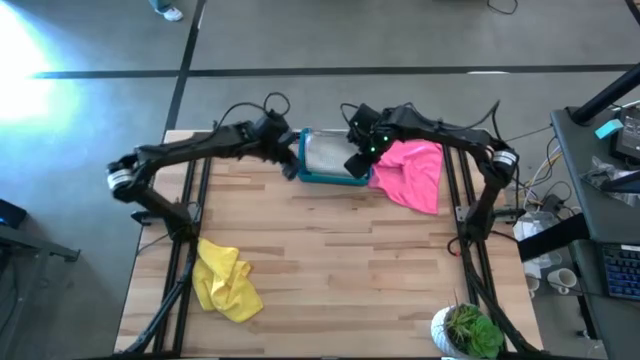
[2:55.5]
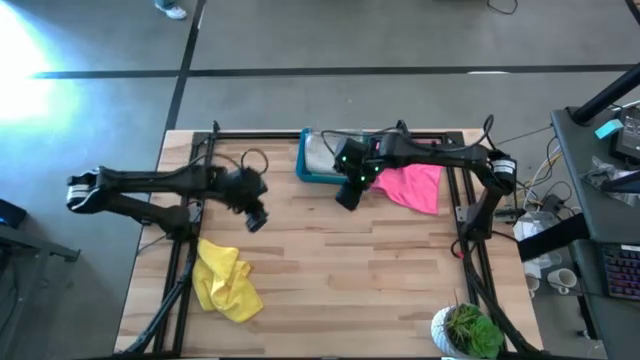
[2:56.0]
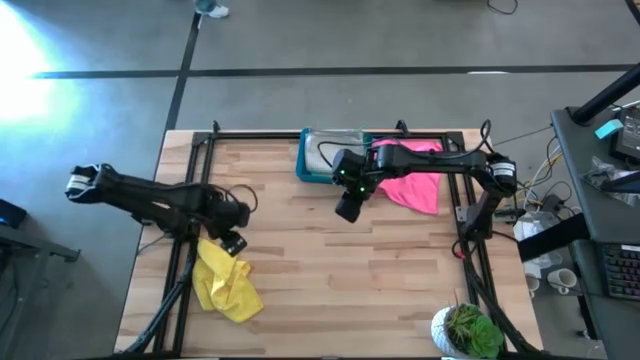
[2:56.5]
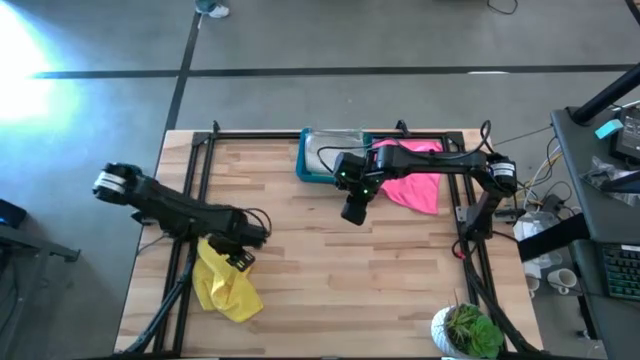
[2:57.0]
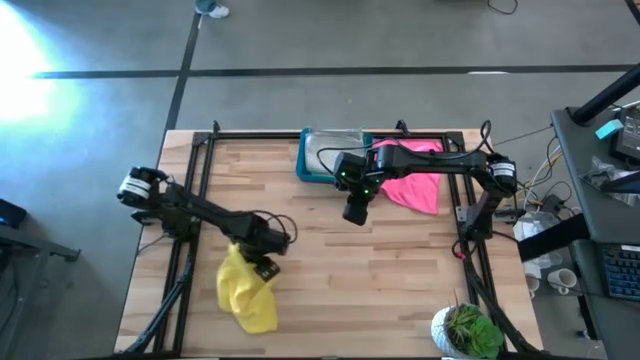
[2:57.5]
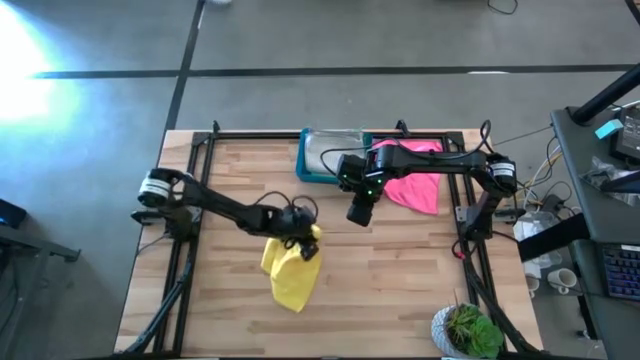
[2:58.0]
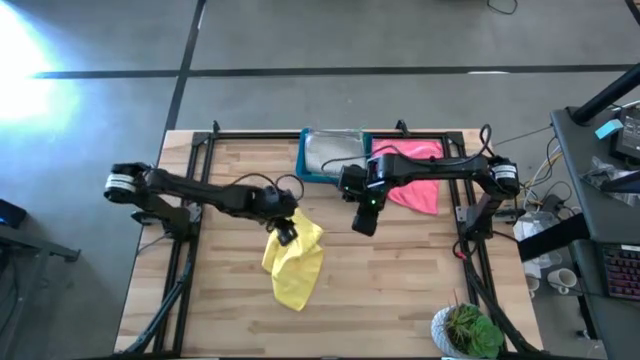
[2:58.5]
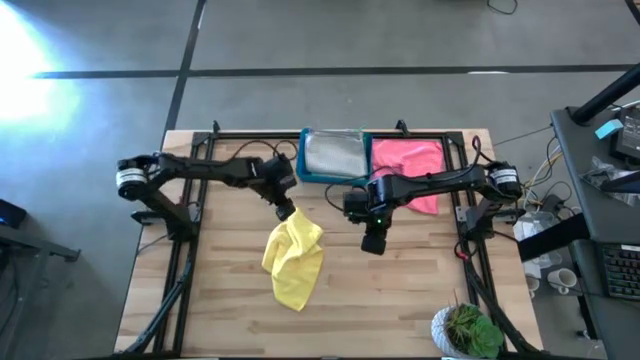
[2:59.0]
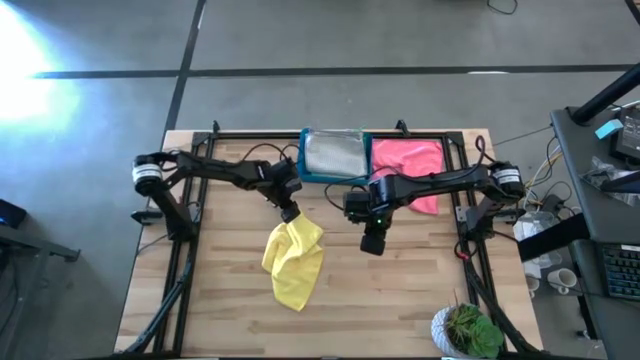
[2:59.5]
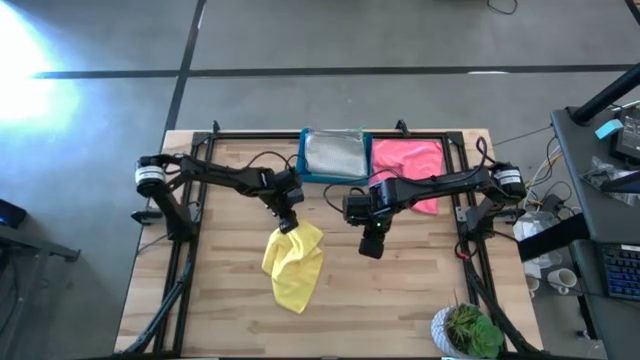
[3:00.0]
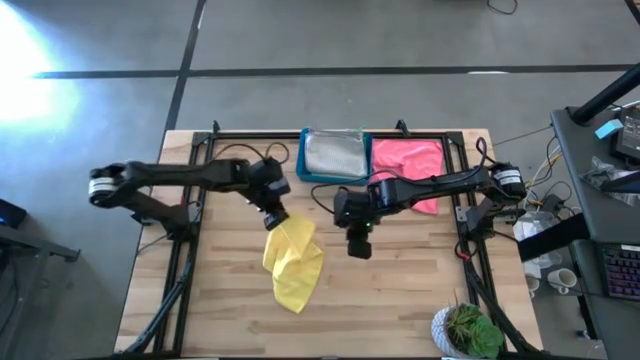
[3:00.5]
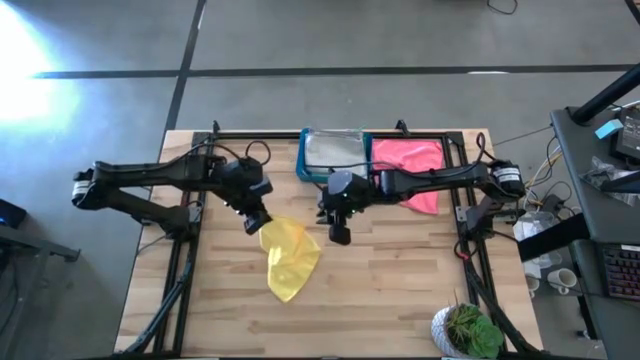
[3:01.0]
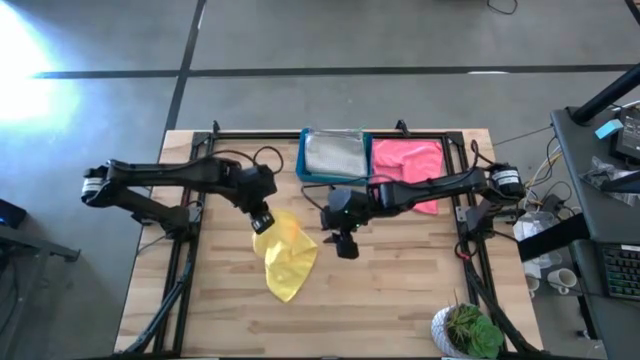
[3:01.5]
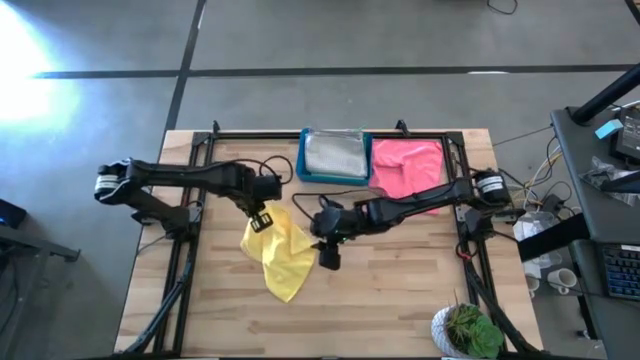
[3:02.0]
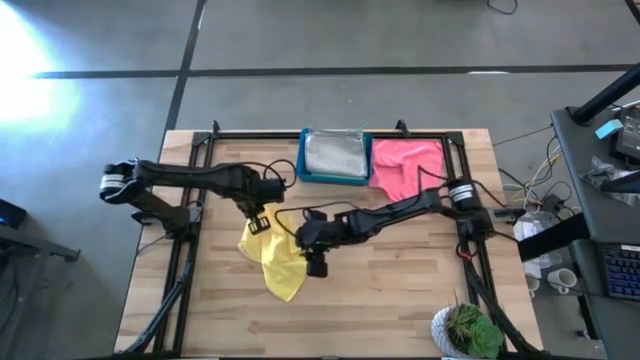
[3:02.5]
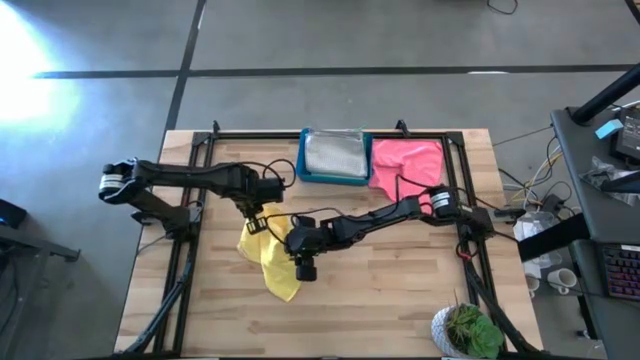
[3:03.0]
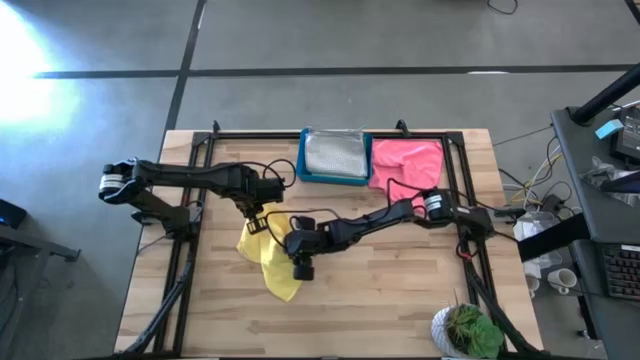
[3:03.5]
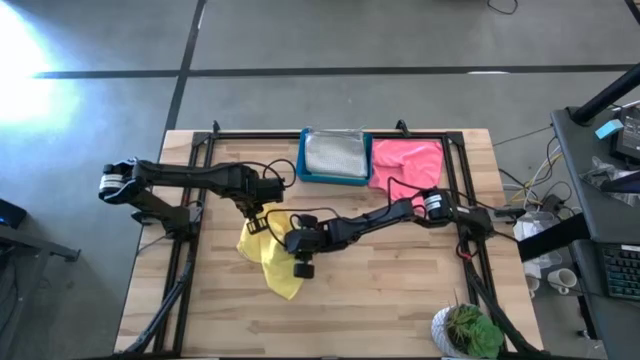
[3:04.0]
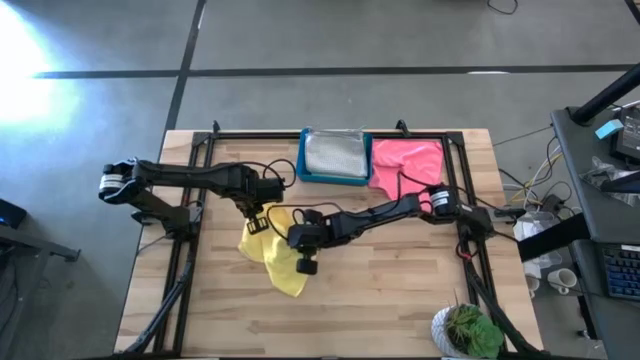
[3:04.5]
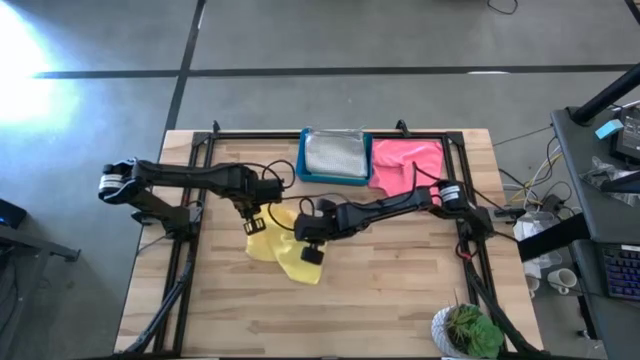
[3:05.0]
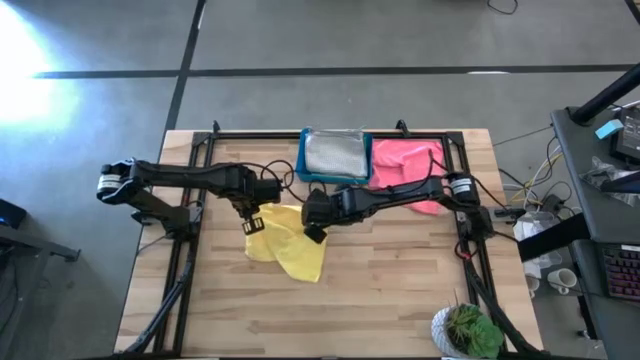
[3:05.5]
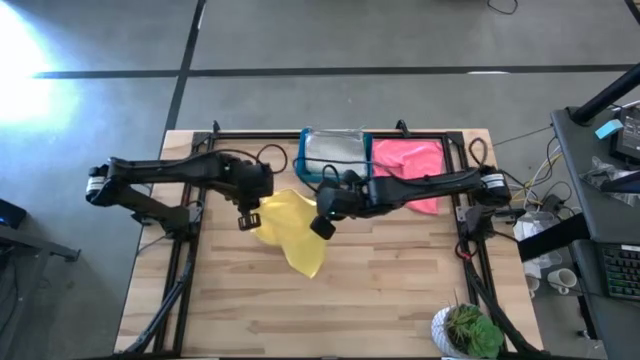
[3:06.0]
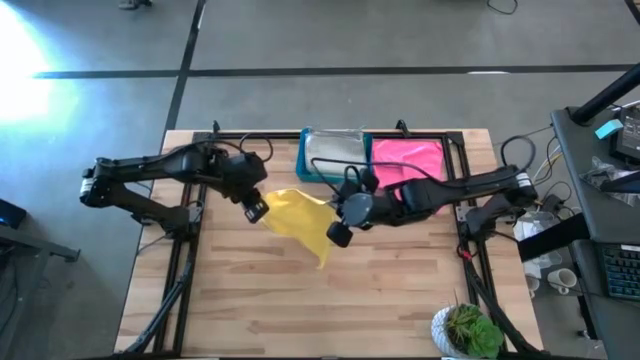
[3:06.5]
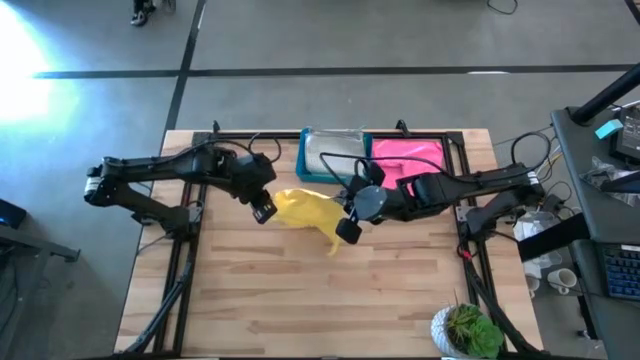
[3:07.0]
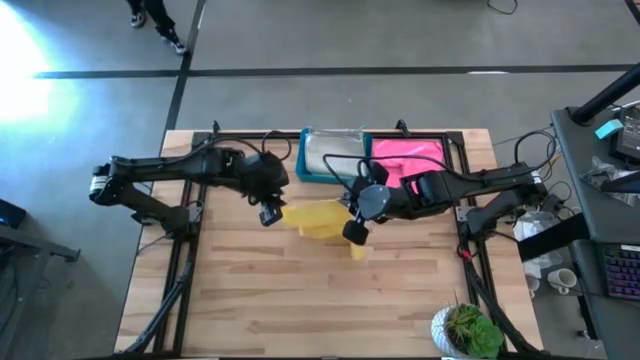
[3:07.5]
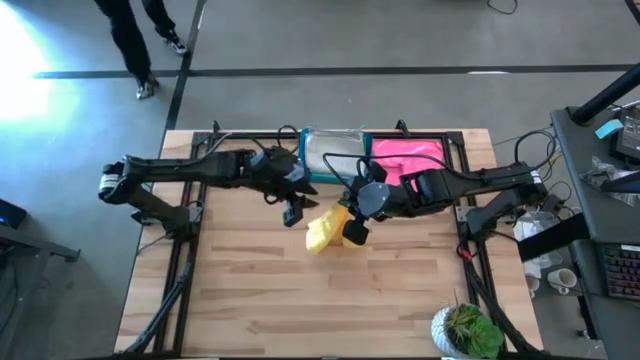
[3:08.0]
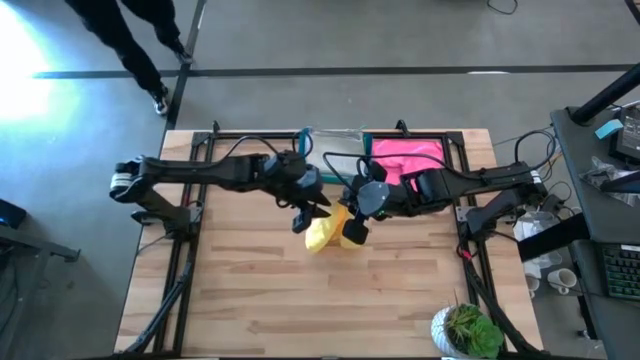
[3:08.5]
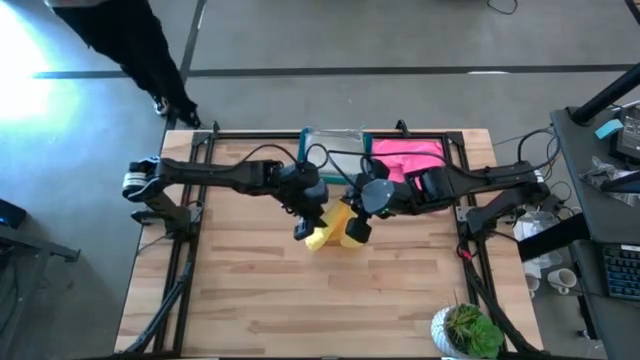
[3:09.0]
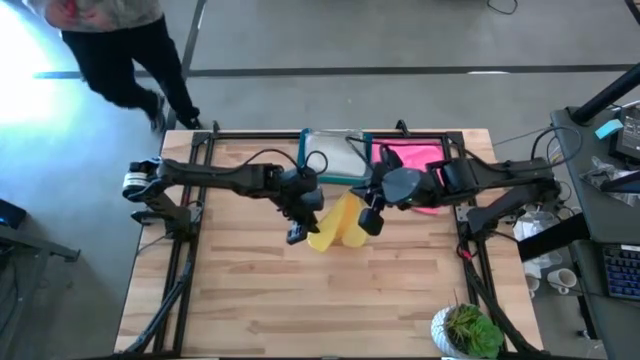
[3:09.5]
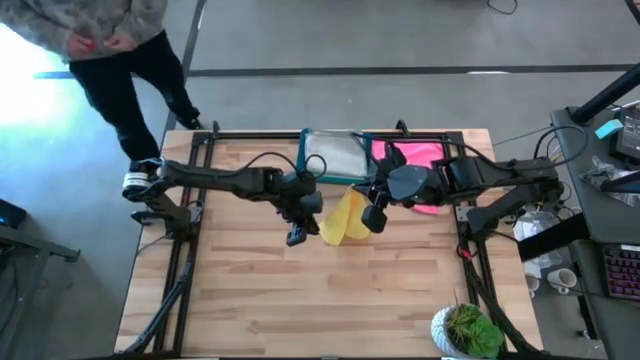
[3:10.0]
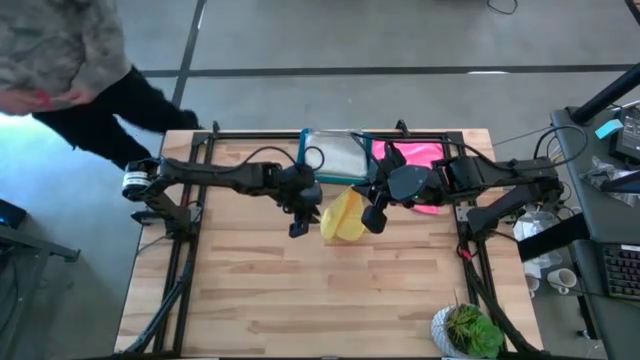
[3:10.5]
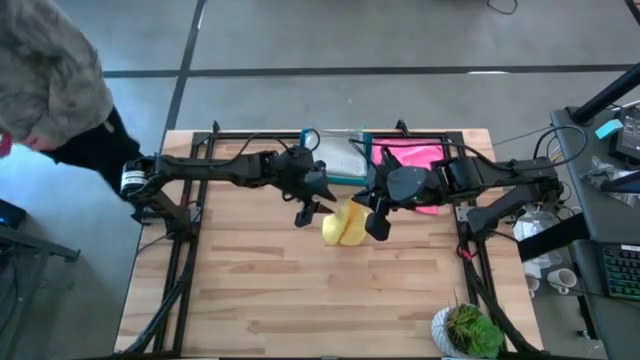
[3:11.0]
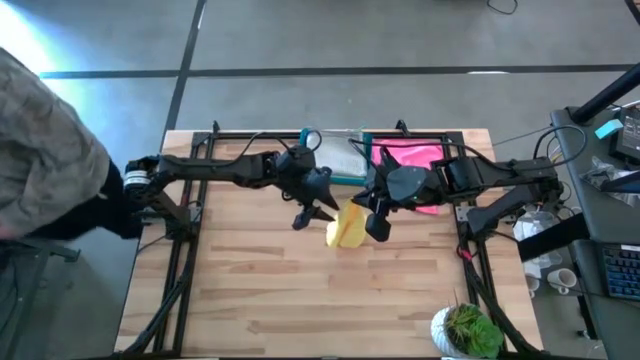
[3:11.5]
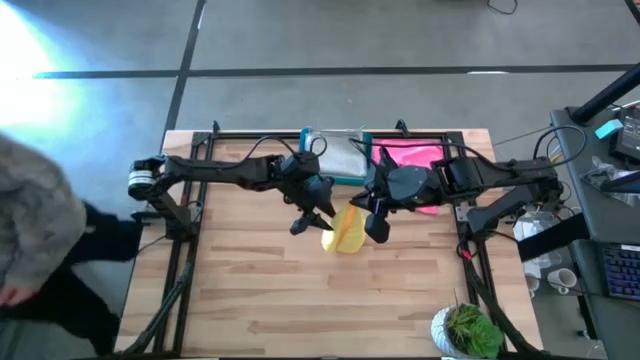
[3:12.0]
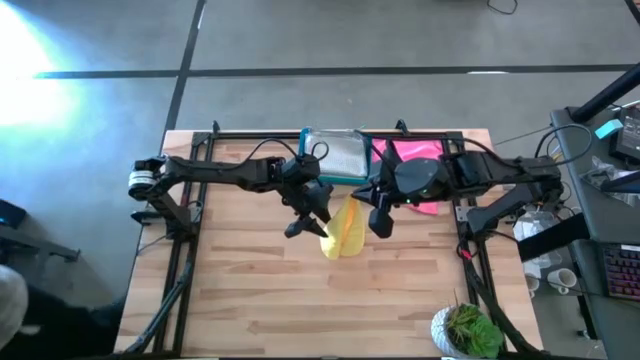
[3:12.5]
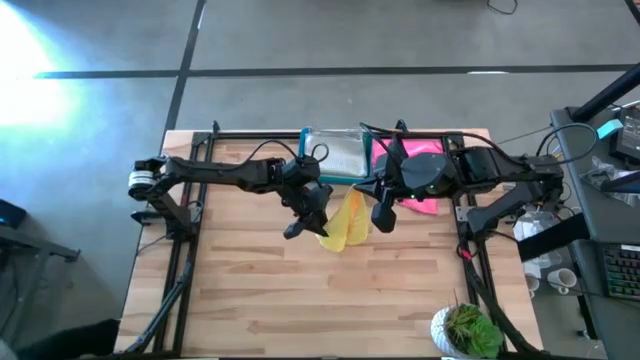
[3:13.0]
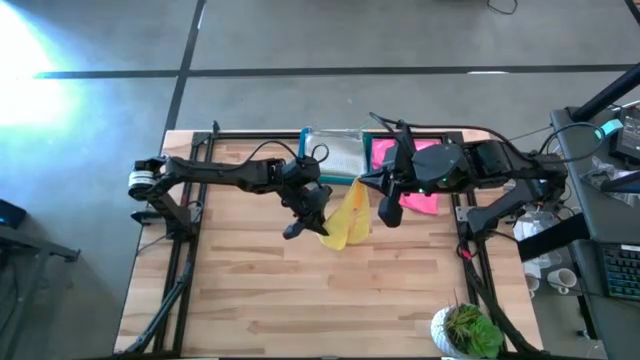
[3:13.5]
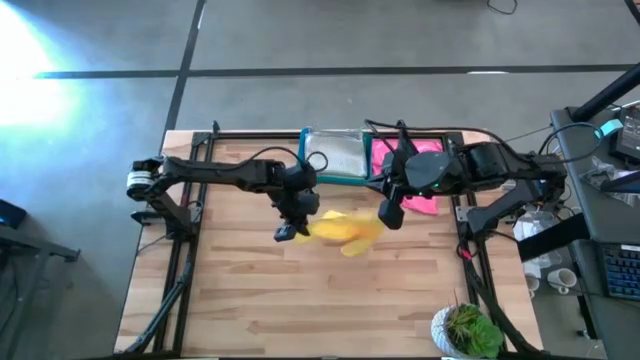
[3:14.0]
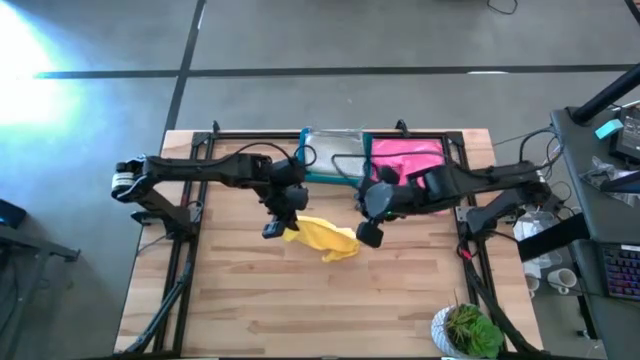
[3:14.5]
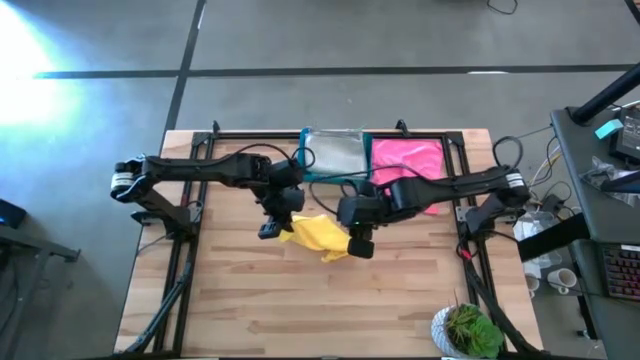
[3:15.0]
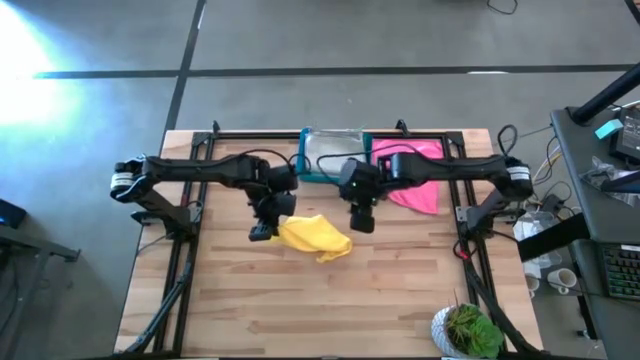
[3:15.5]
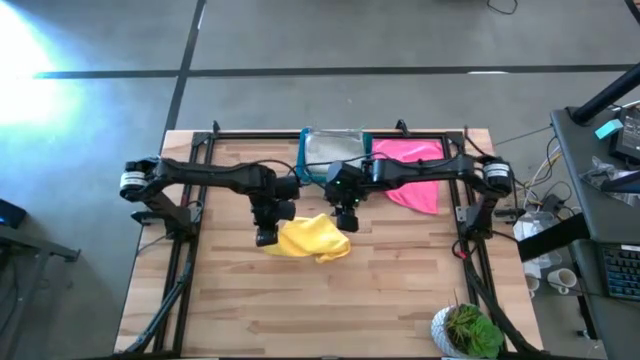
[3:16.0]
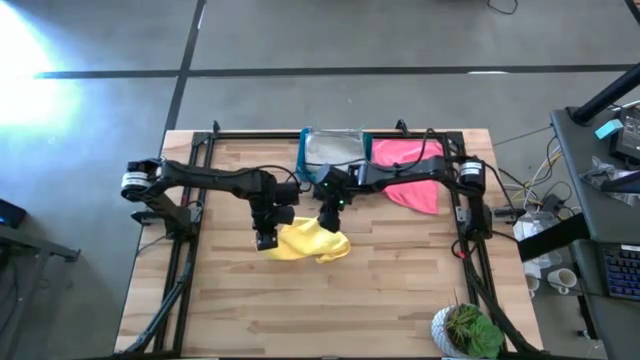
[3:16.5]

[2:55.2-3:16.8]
Task: Fold microfiber towels
Fold the yellow microfiber cloth

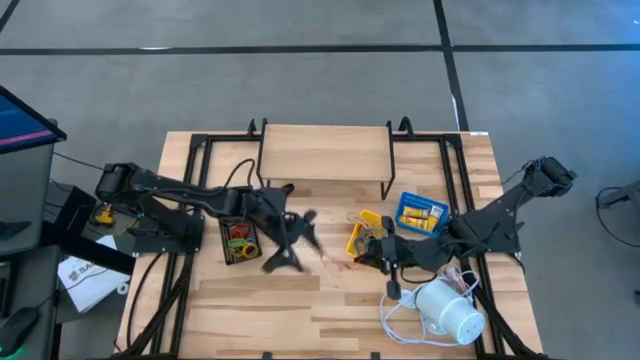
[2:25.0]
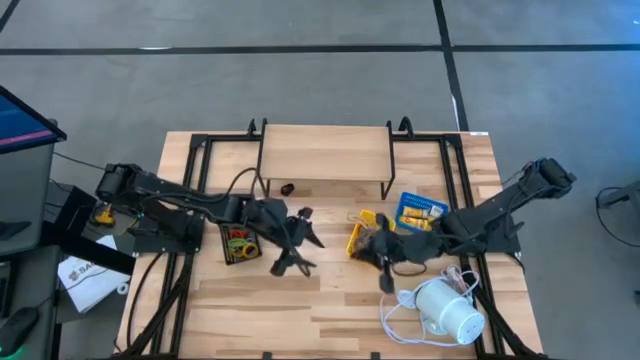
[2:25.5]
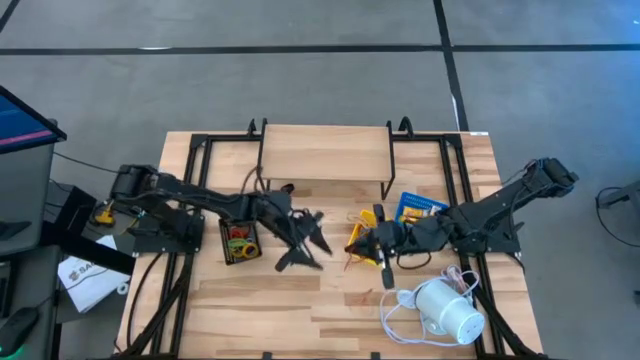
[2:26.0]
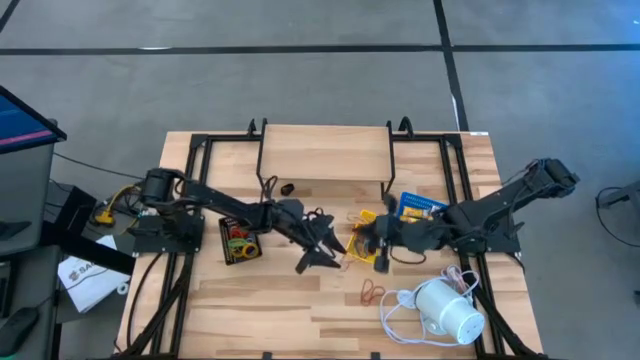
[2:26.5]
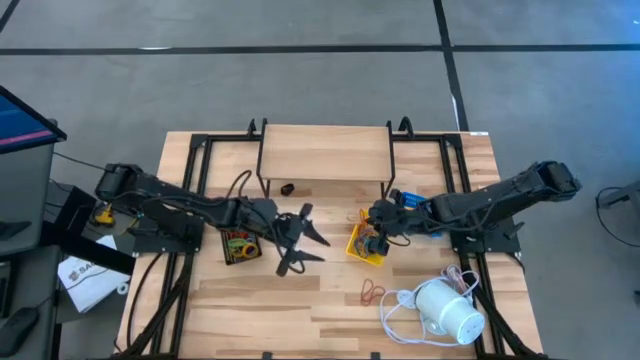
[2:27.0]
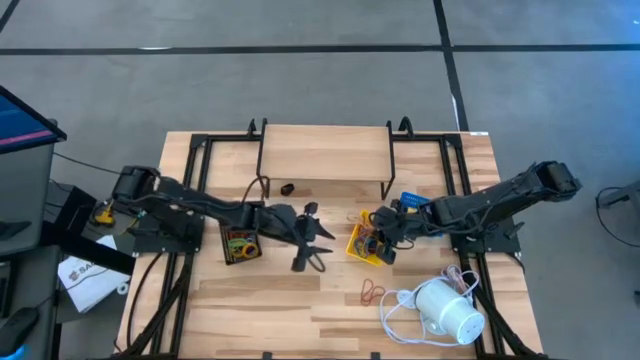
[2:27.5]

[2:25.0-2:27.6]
Task: Pick & Place Office Desk Supplies
Put the red rubber band into the yellow bin
